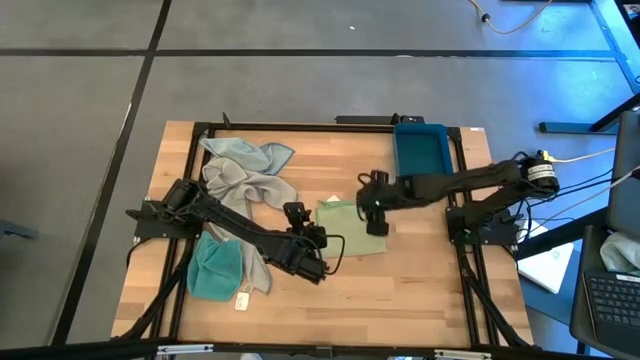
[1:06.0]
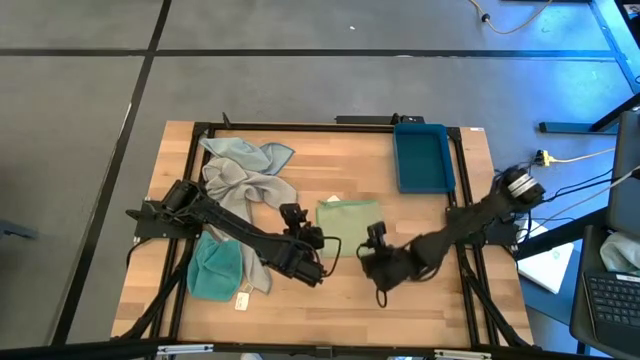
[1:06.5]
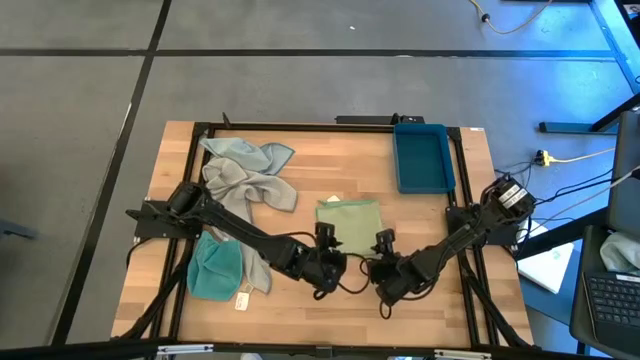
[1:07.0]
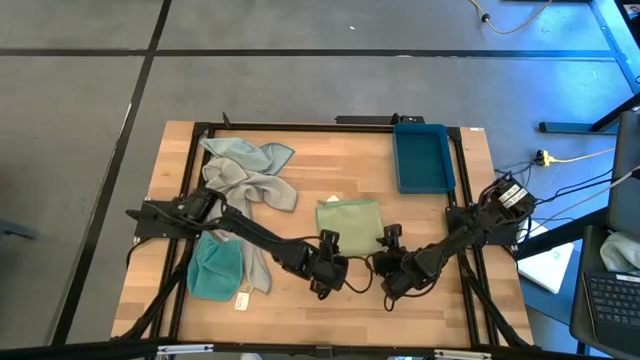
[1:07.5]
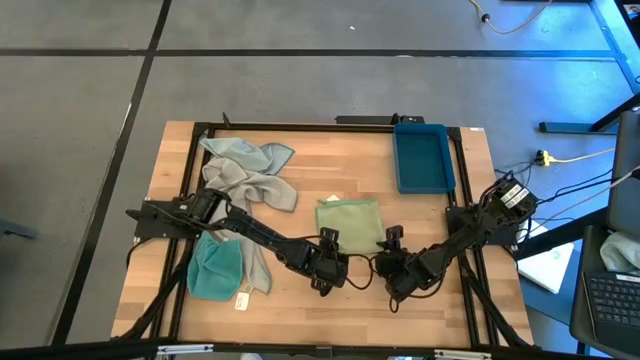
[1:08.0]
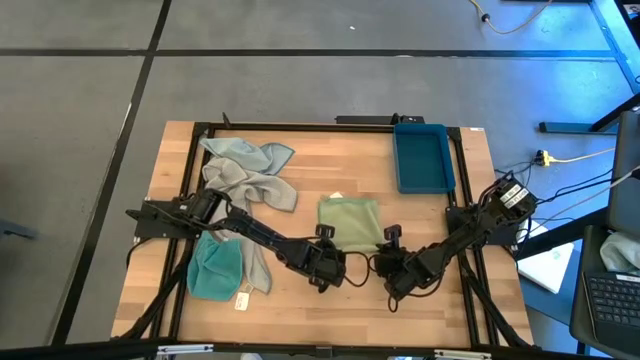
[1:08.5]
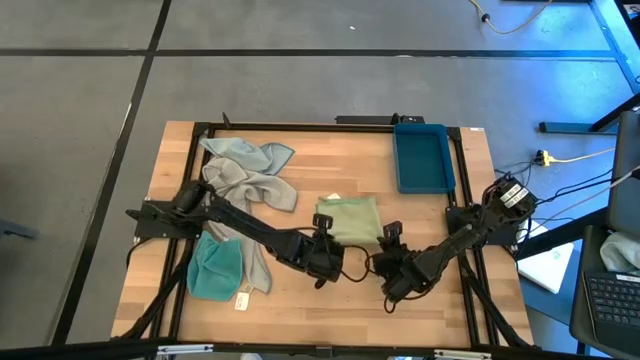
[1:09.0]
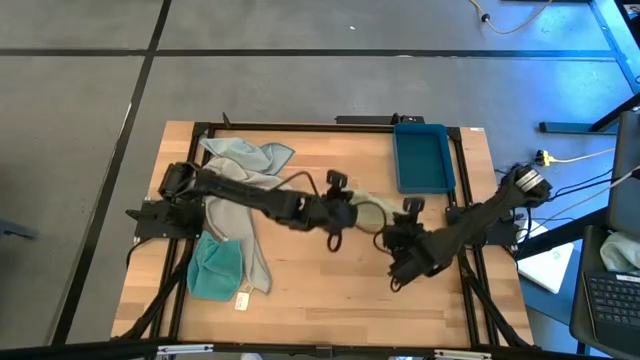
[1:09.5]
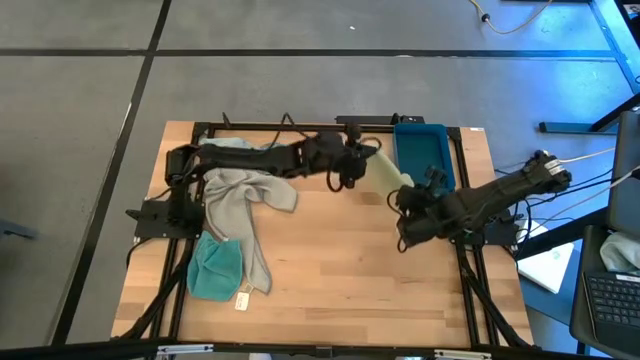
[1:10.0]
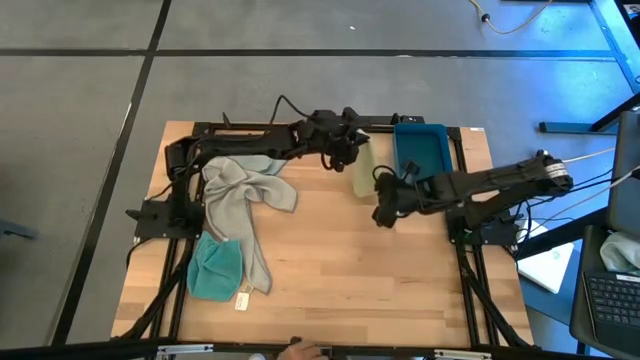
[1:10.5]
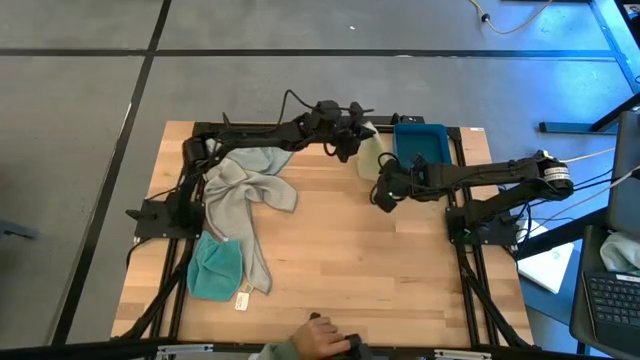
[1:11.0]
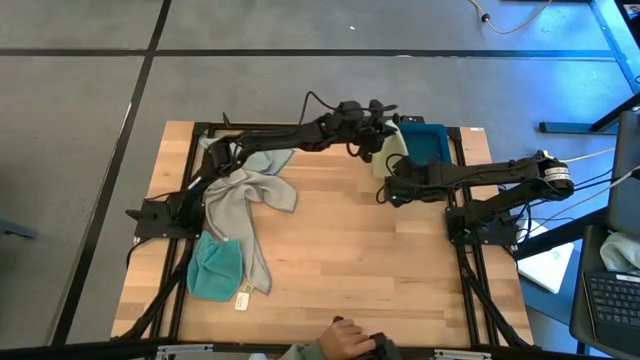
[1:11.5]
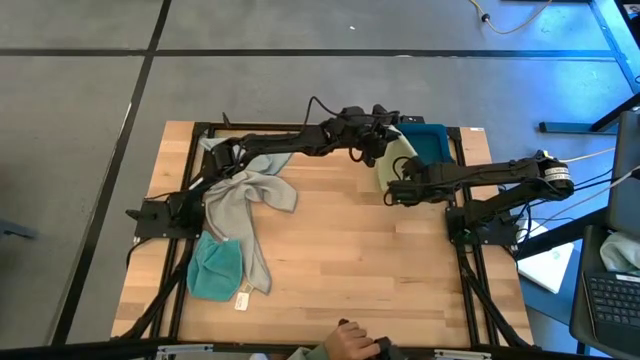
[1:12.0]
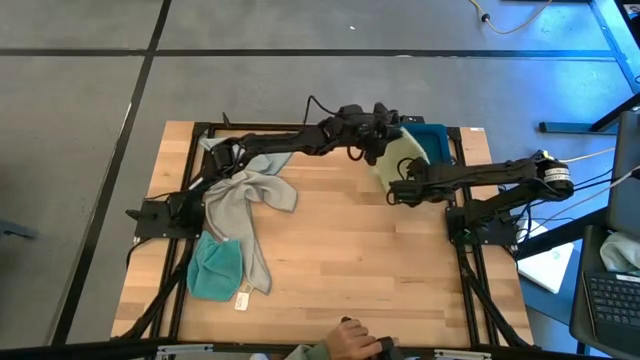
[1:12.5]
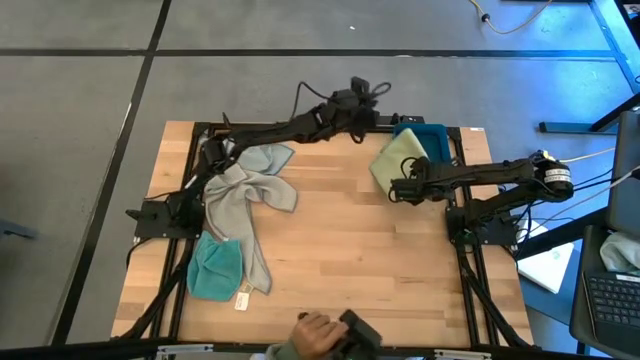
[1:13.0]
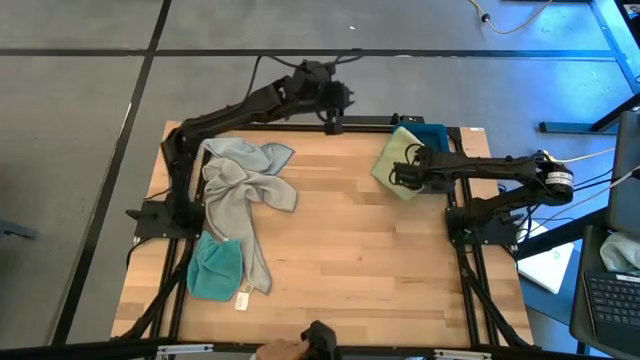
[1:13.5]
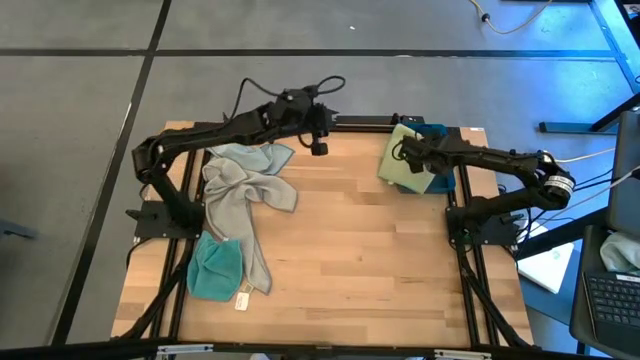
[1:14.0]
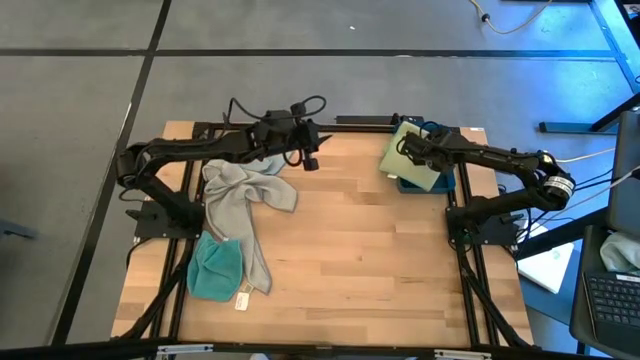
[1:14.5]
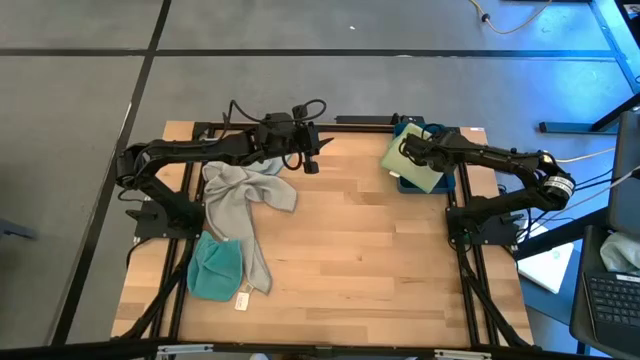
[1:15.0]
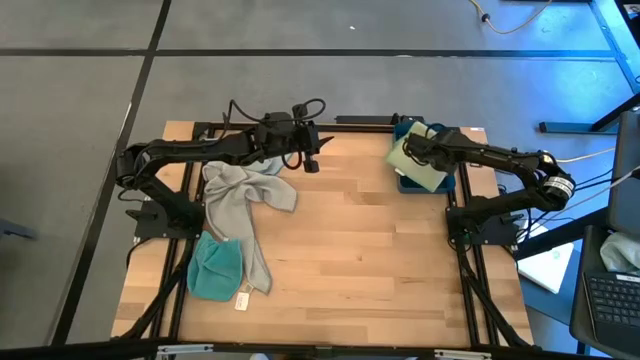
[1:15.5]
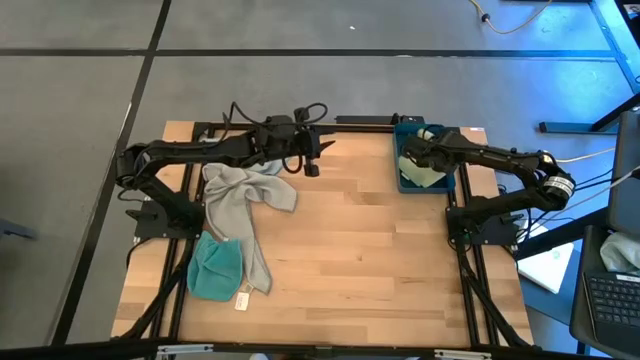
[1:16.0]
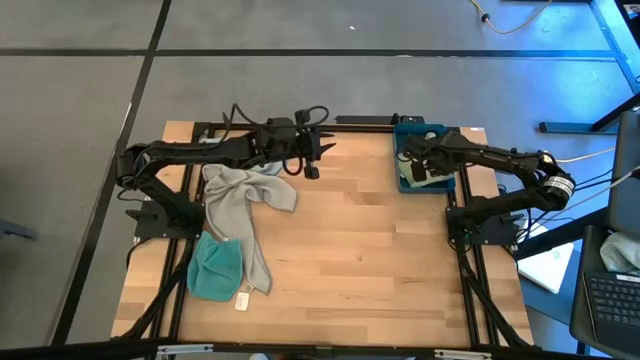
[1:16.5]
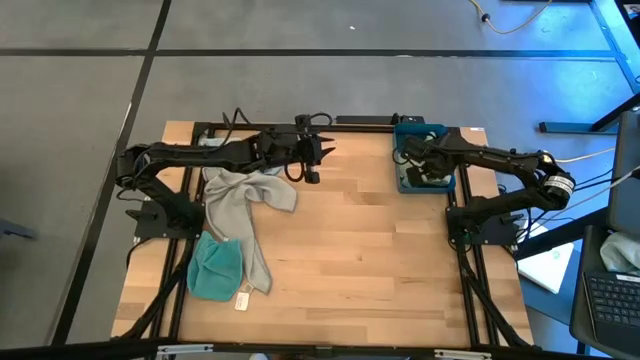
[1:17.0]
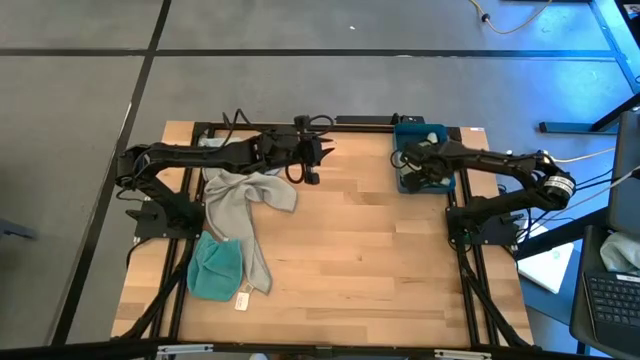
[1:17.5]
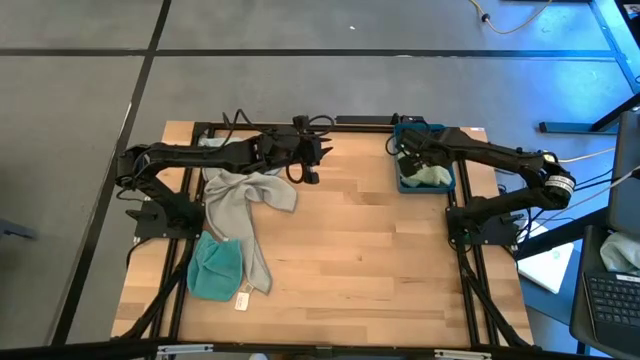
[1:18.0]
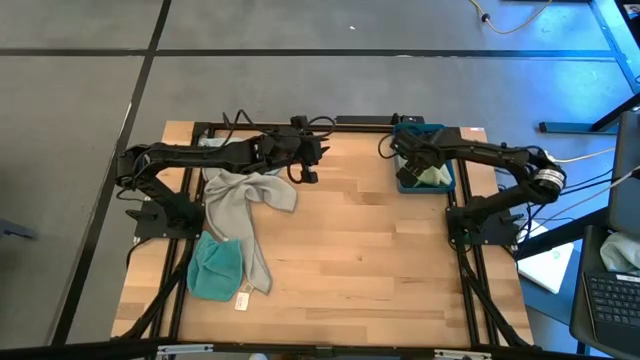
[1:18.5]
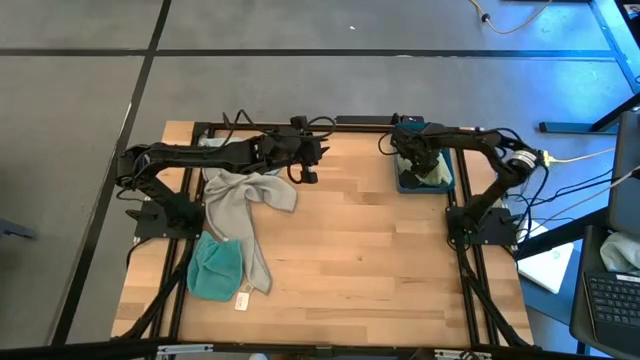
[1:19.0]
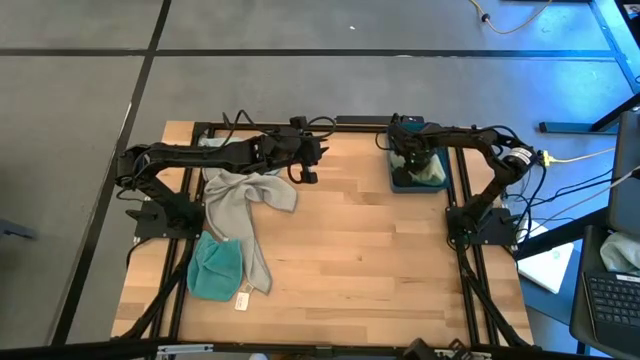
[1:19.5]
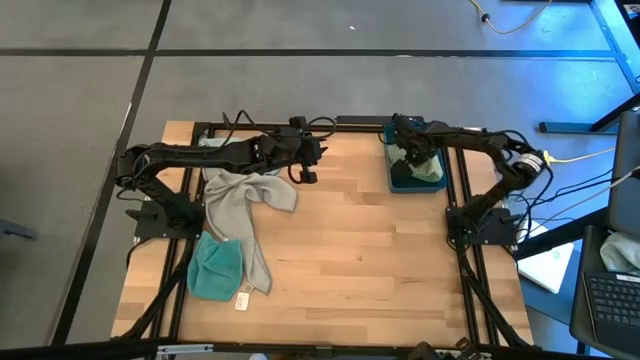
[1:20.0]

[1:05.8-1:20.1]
Task: Fold microfiber towels
Put the green microfiber cloth into the blue bin

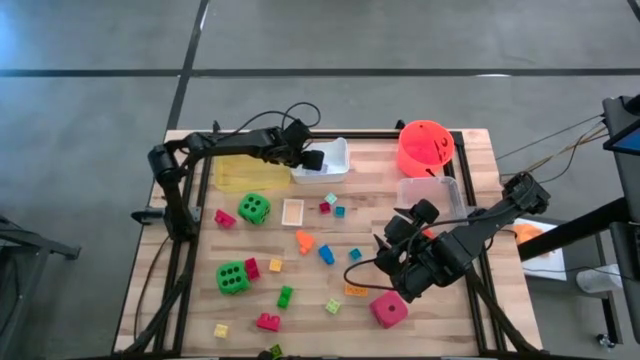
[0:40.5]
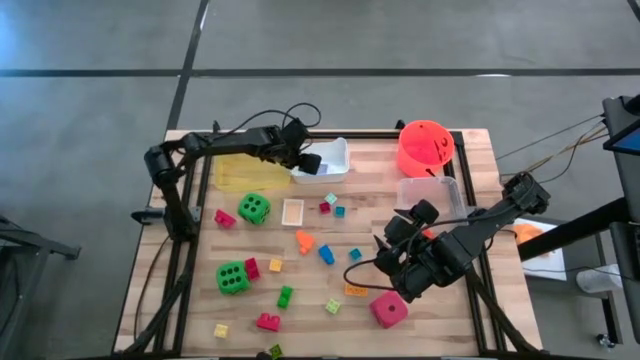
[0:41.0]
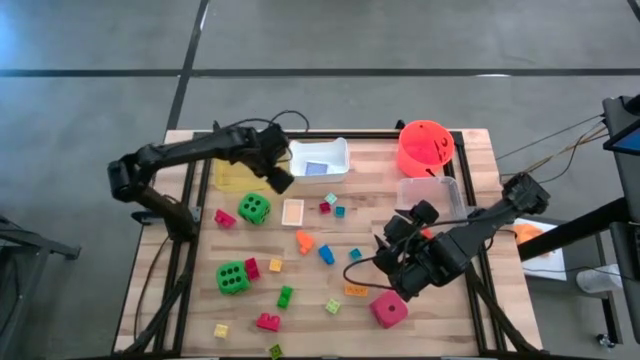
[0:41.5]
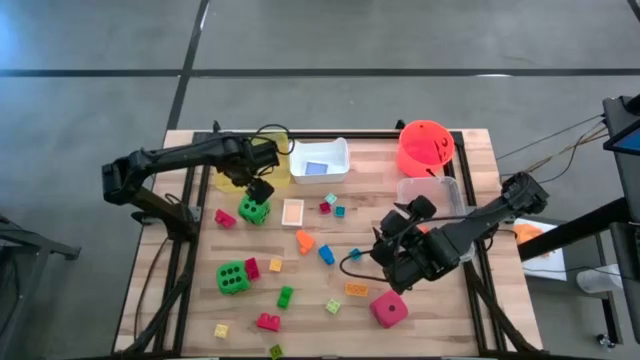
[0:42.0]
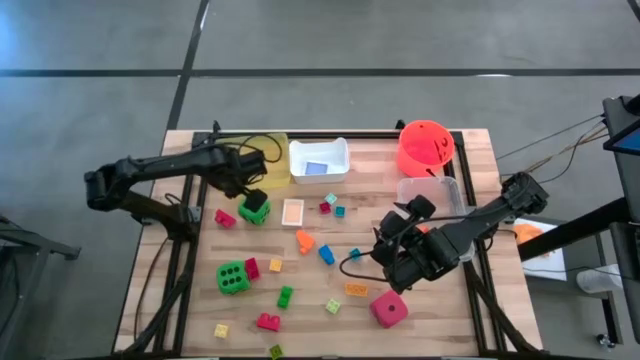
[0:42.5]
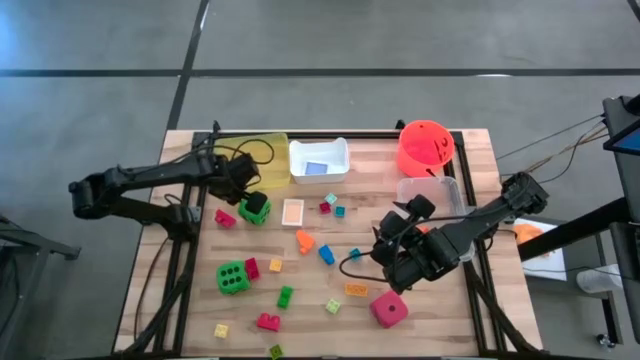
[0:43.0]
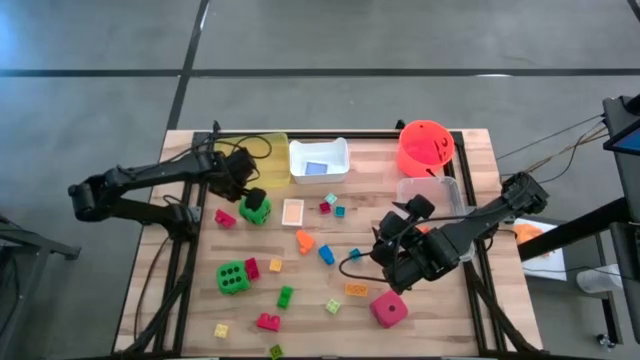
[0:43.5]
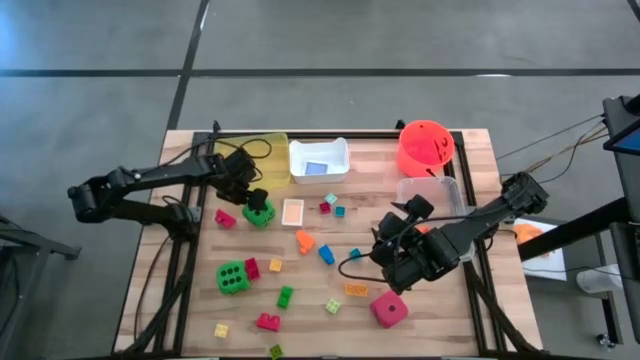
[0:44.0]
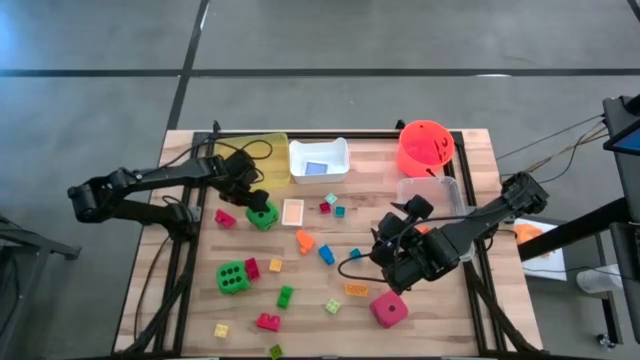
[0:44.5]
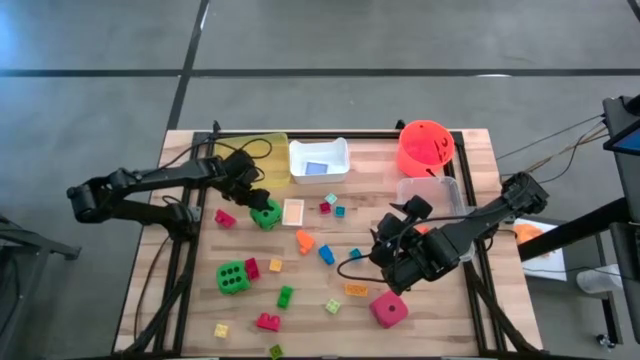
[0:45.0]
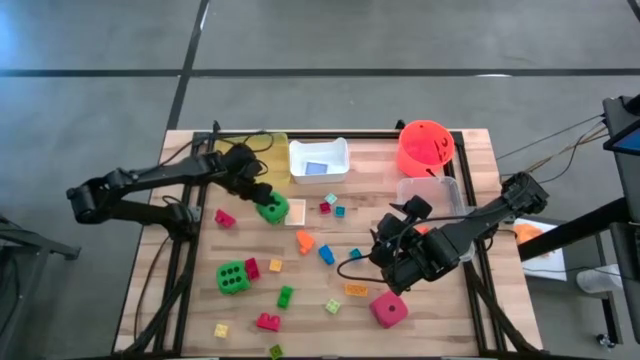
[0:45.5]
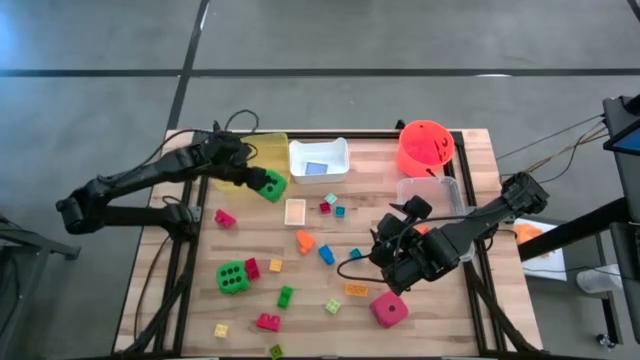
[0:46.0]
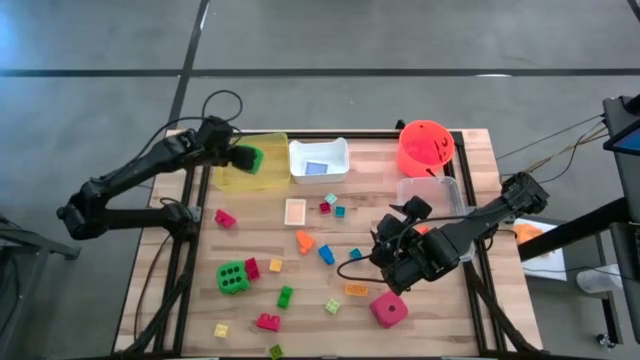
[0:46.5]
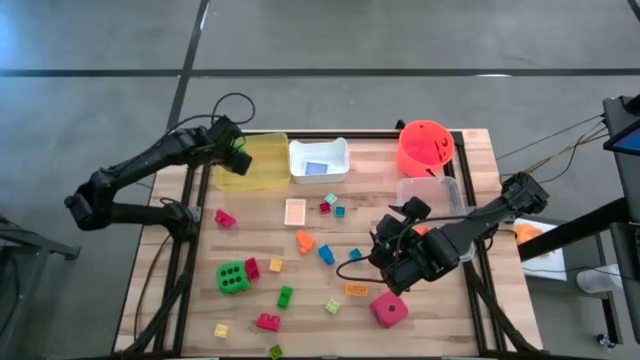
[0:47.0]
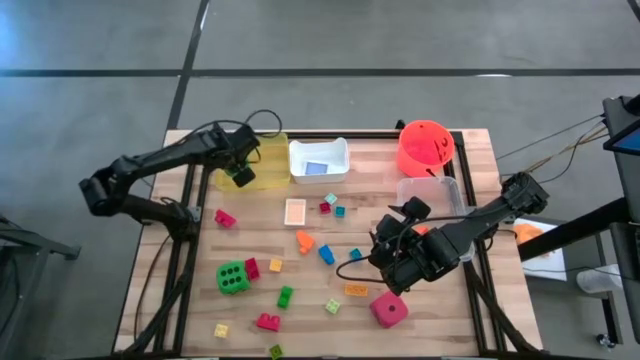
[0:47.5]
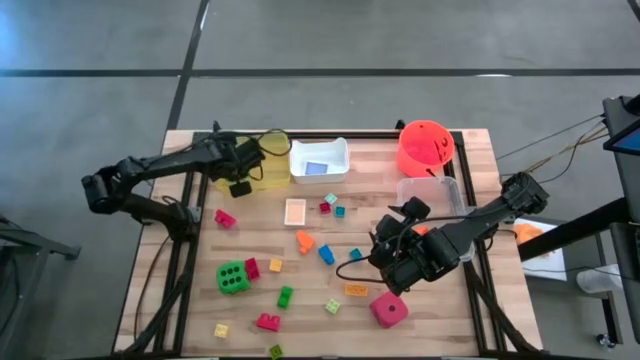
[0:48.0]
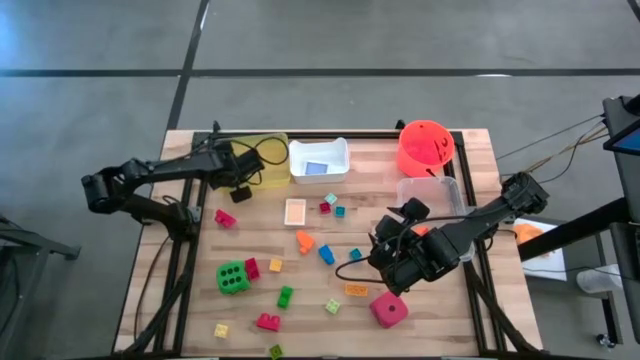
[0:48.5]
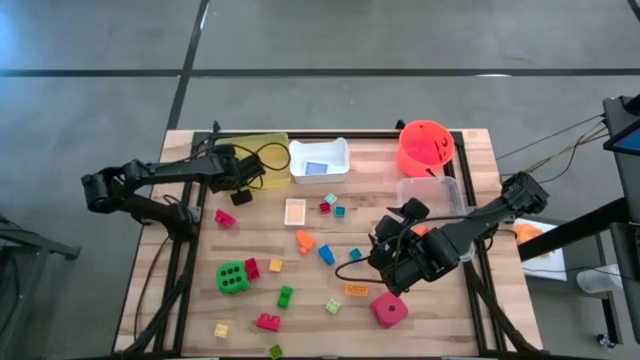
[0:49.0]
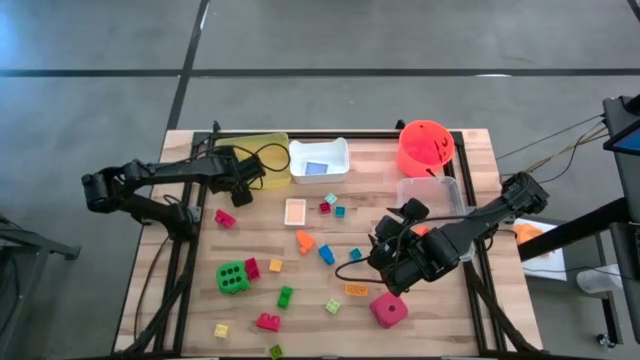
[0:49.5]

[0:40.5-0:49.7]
Task: Pick & Place Toys
Put the green dice into the yellow bin
